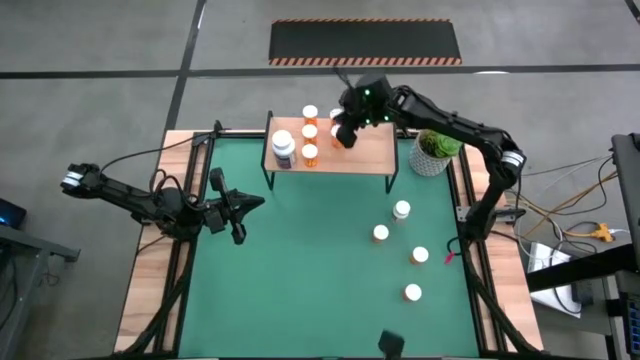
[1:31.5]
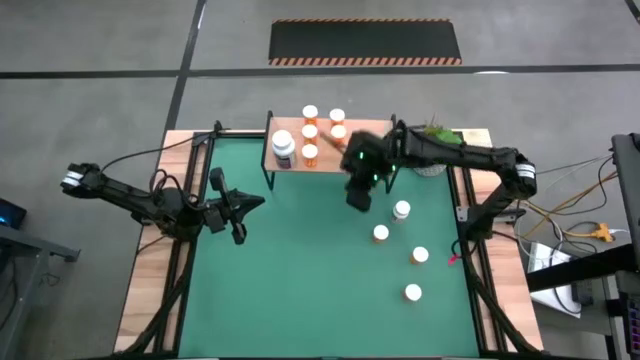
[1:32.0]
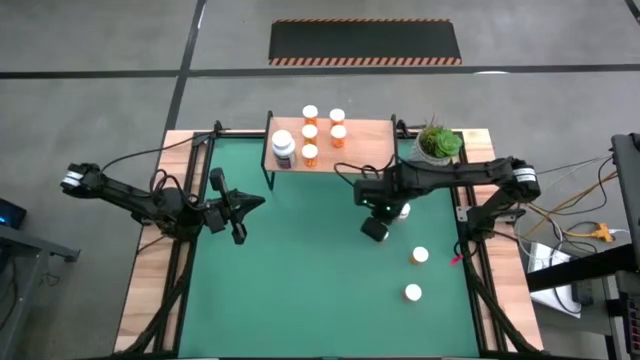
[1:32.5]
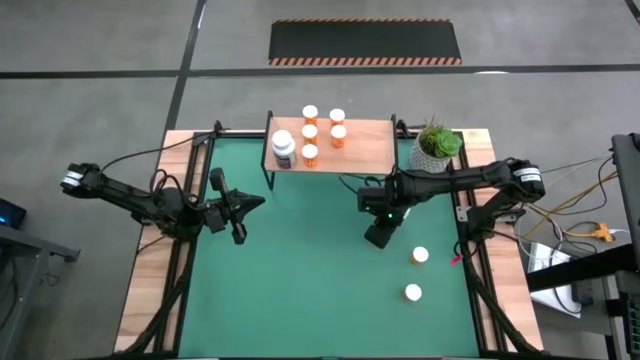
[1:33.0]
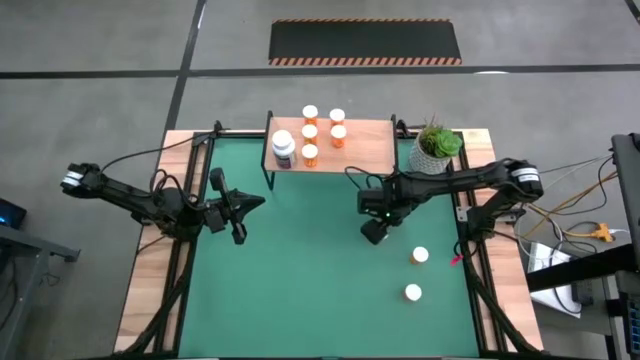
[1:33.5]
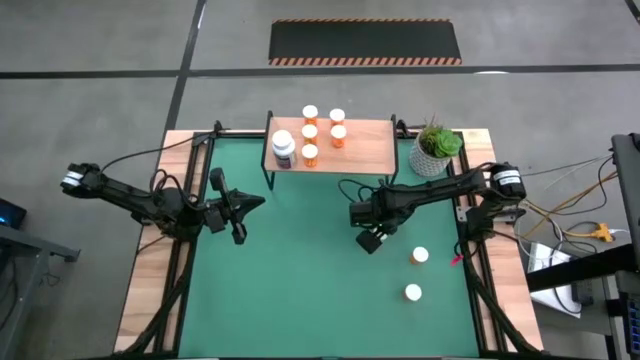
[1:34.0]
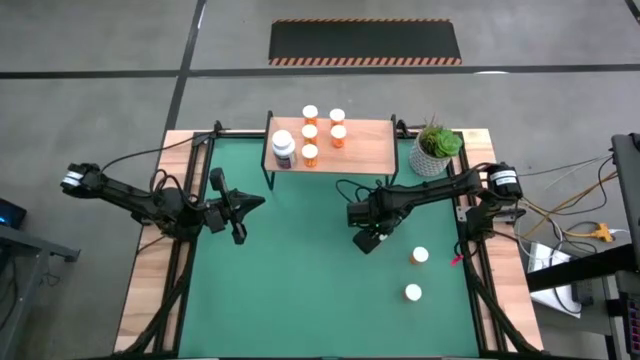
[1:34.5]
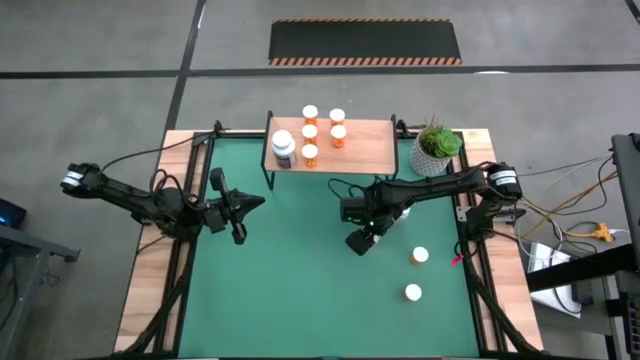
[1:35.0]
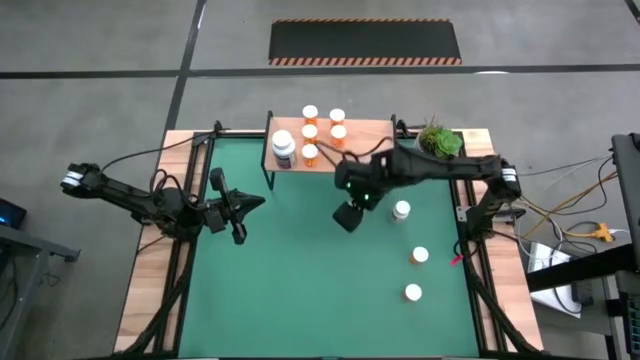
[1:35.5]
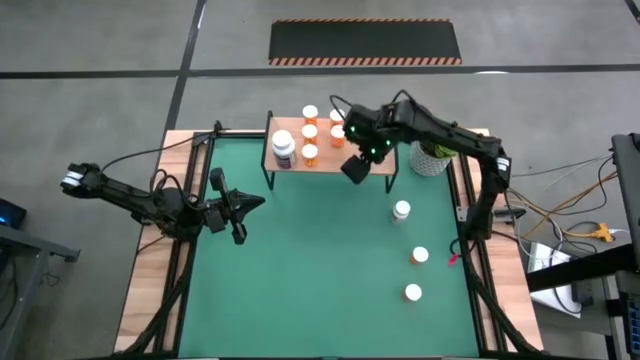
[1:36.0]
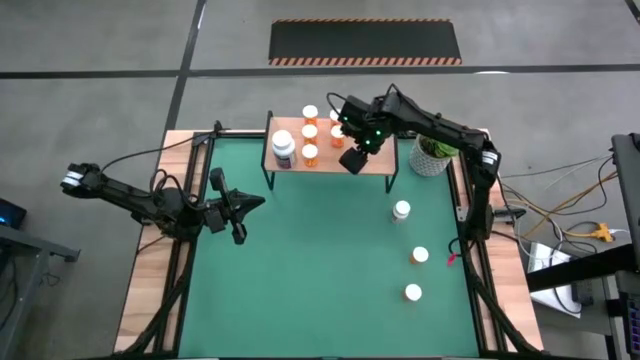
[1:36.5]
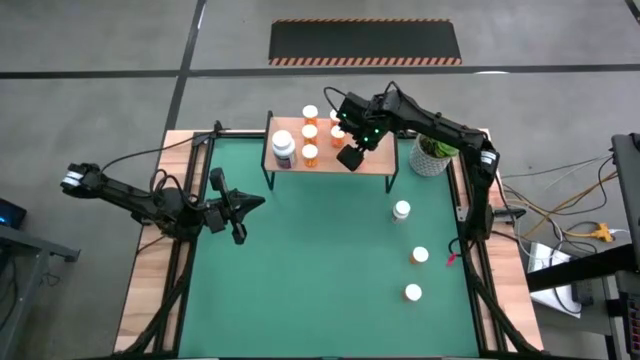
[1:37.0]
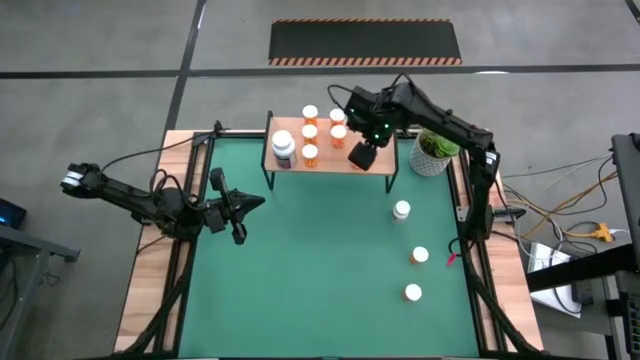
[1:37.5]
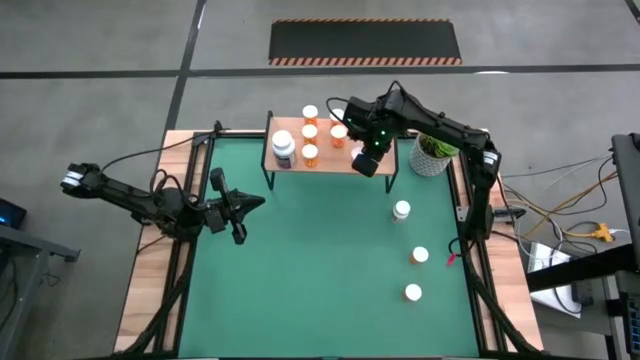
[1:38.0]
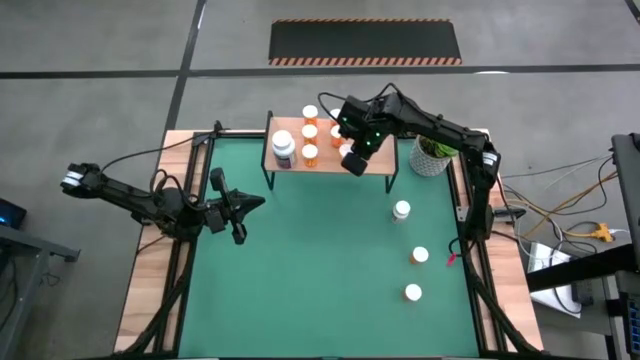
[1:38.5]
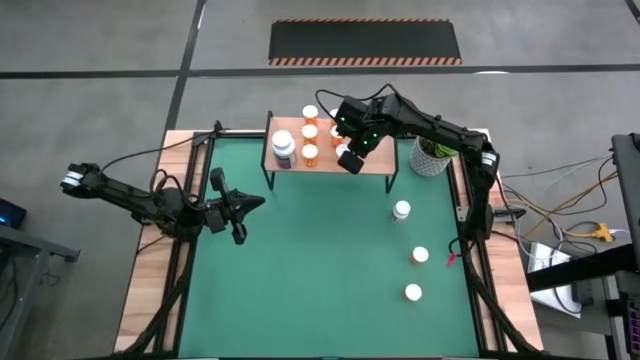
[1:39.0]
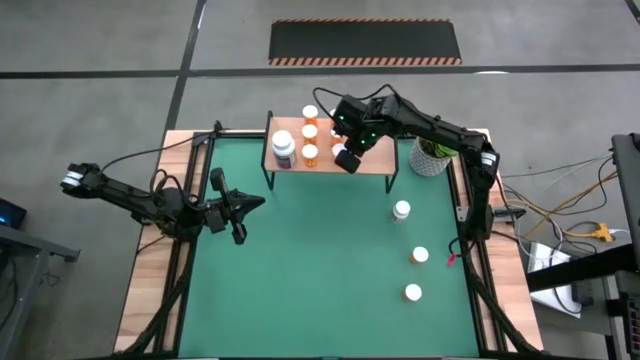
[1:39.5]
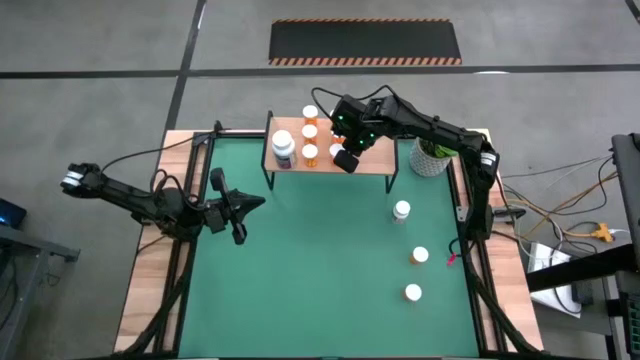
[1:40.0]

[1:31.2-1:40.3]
Task: Pick and place medicine bottles onto shelf by color
Put the orange pill bottle on the shelf aligned with the other orange pill bottles

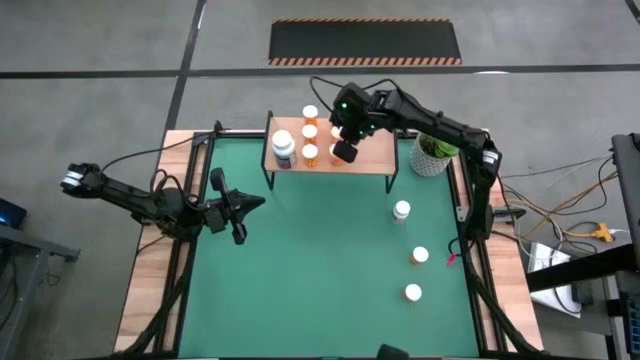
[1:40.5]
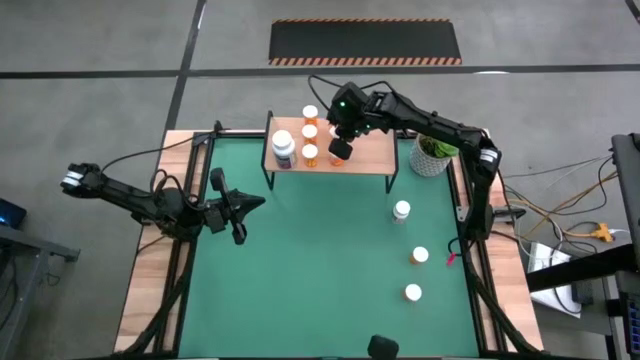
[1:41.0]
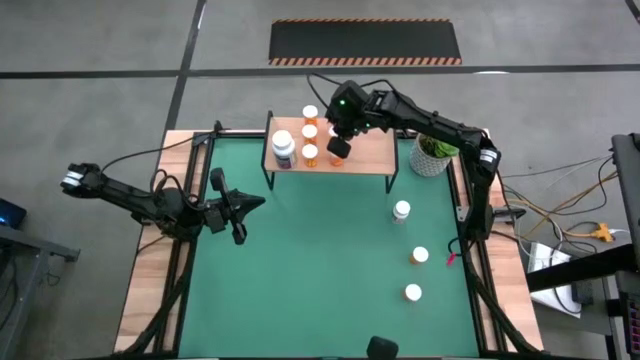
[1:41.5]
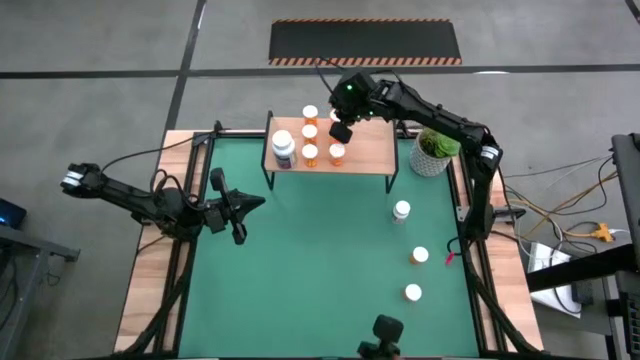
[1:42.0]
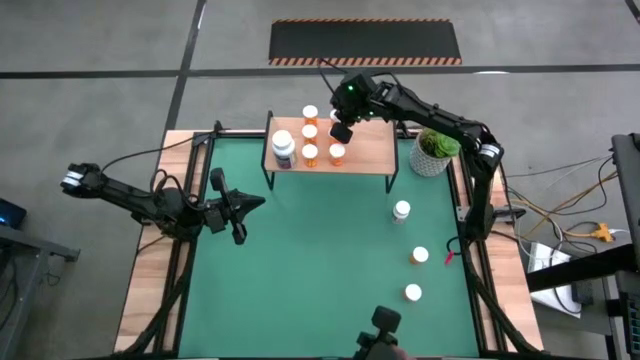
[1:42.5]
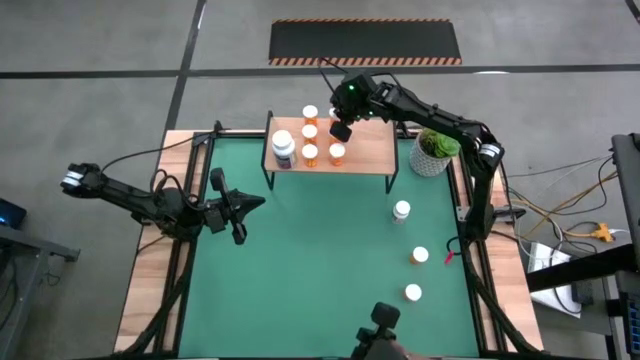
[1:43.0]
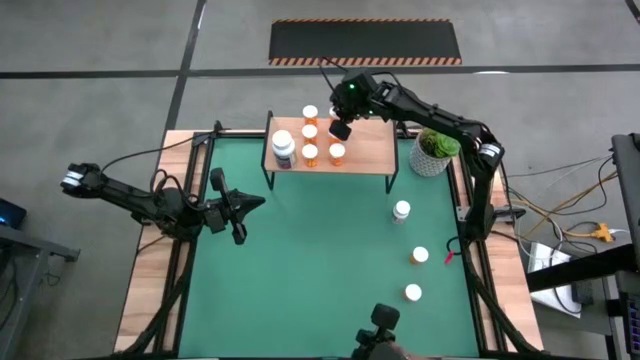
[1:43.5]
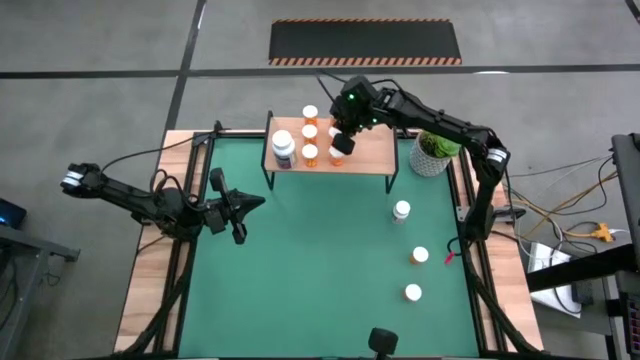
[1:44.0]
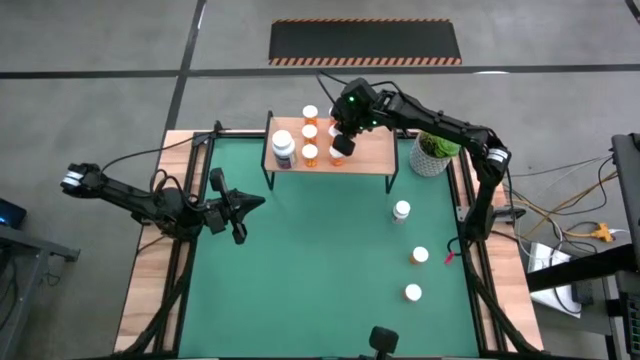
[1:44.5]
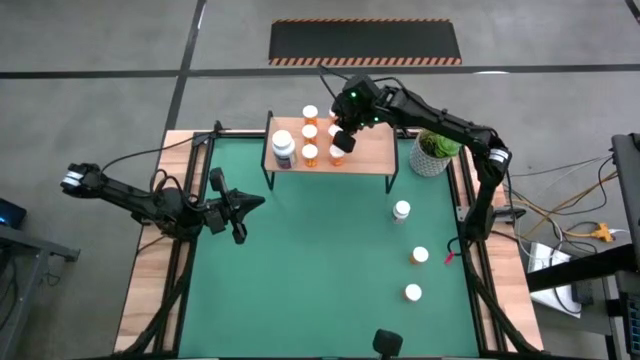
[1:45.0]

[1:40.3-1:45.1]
Adjust the orange pill bottles on the shelf

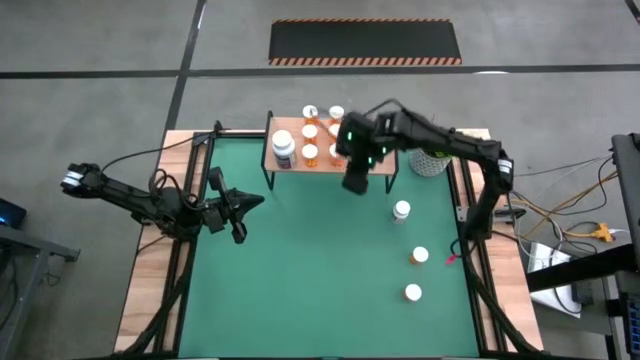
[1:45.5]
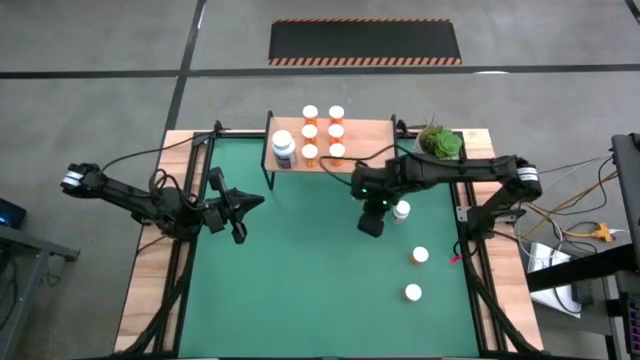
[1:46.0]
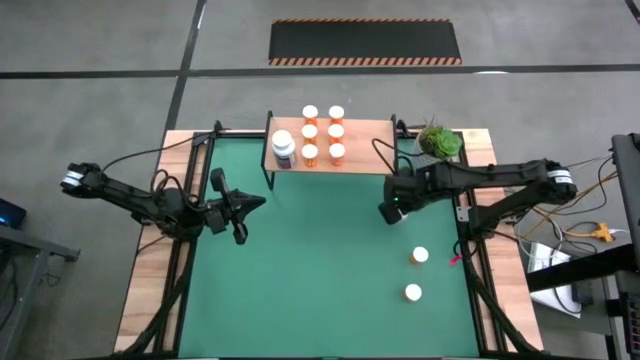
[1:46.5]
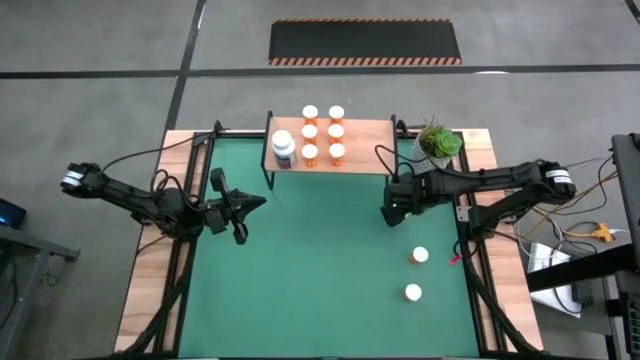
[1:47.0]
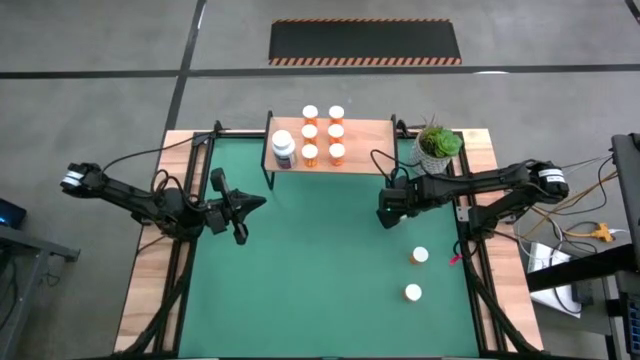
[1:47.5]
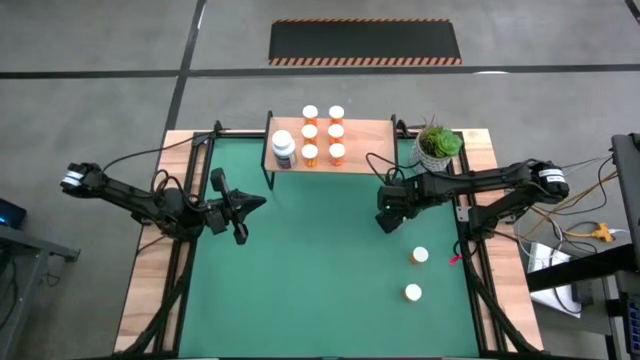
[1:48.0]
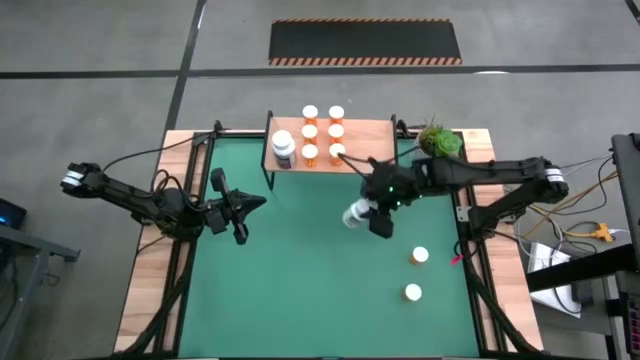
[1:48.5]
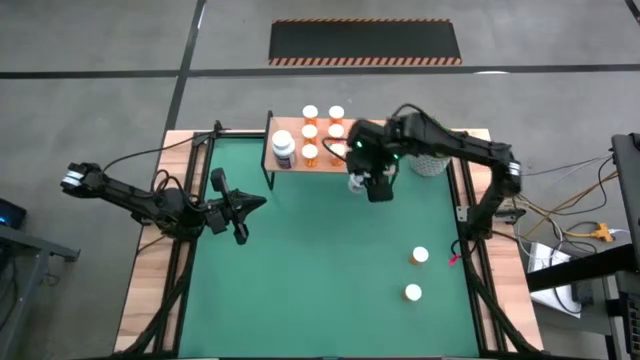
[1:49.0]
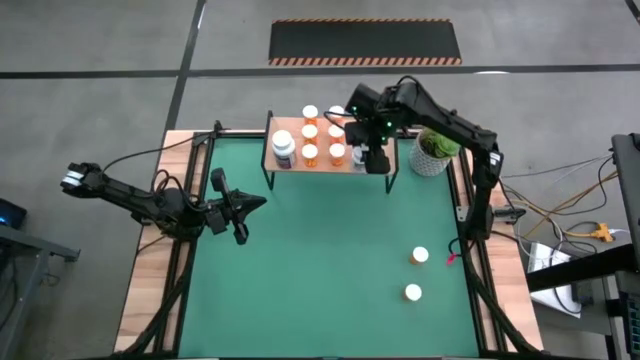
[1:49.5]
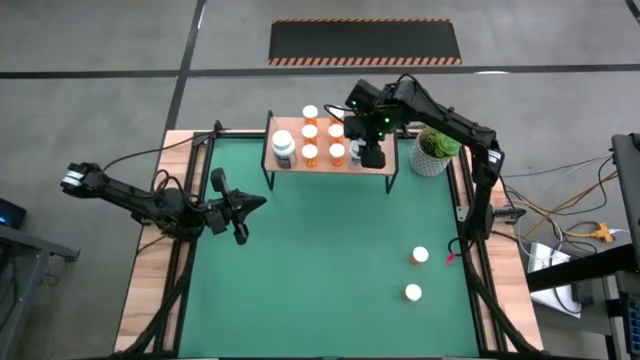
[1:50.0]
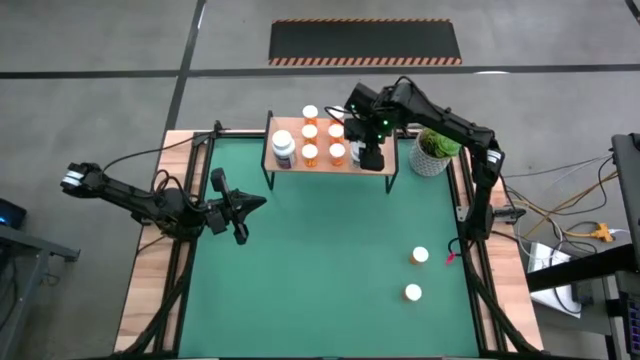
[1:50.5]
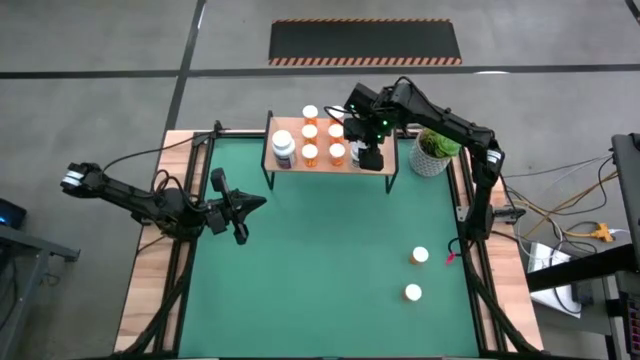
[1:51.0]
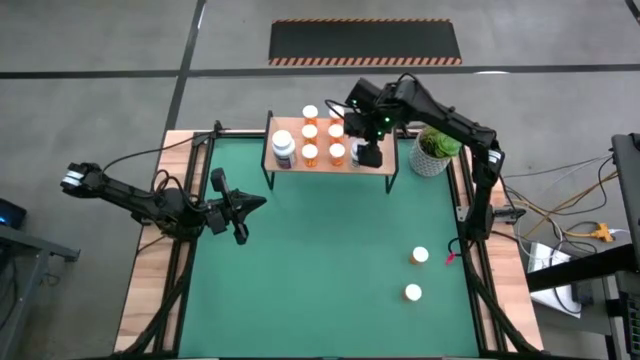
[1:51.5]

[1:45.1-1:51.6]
Put the white medicine bottle on the shelf

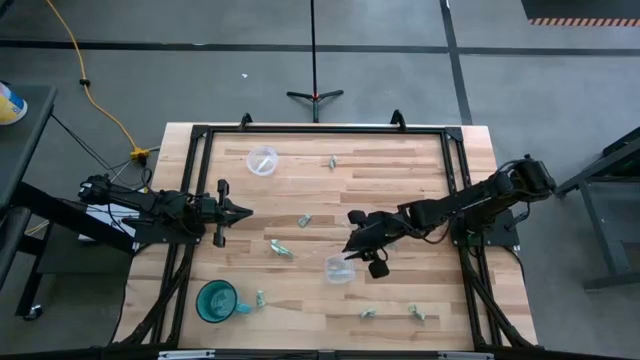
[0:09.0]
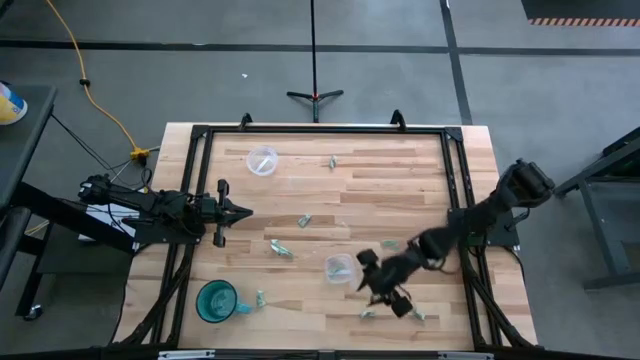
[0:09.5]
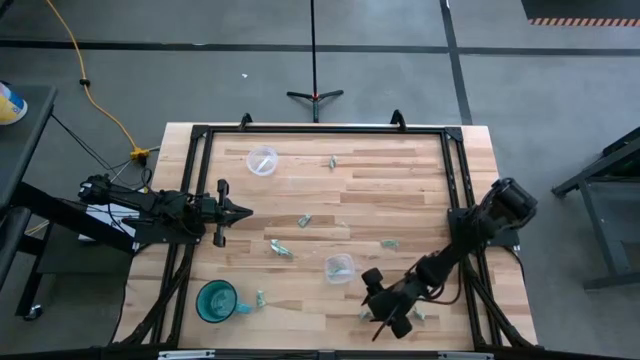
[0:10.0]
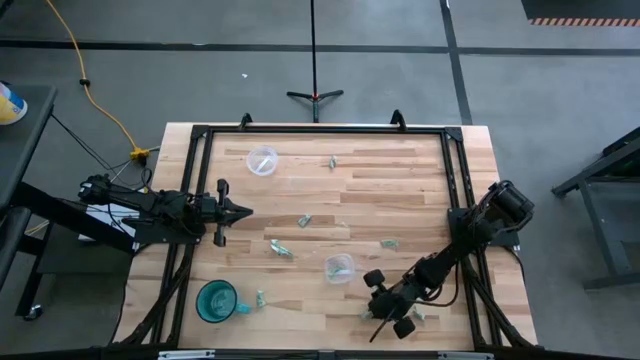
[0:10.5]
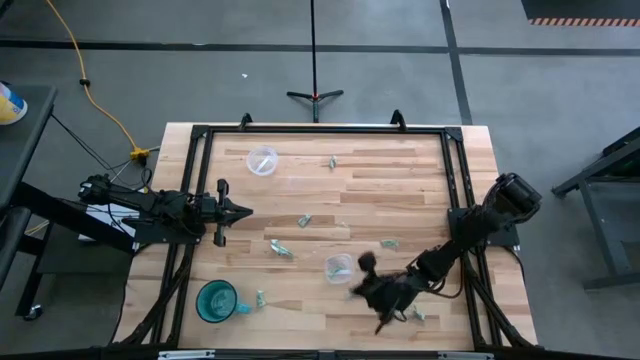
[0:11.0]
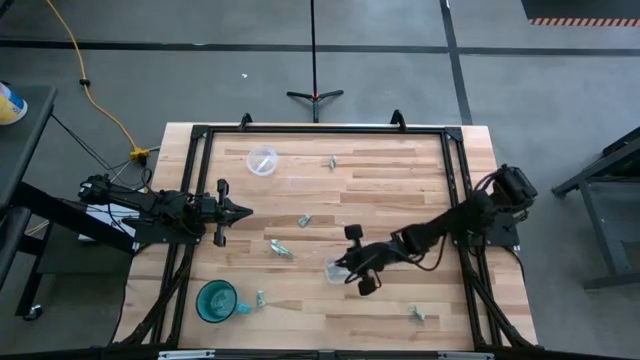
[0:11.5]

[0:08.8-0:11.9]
Task: Pick and place Stevia / Truvia into bins
Put the stevia packet into the bottom transparent container
